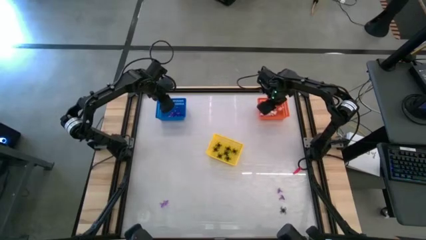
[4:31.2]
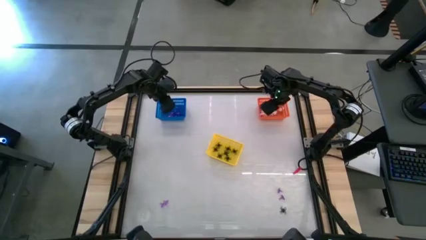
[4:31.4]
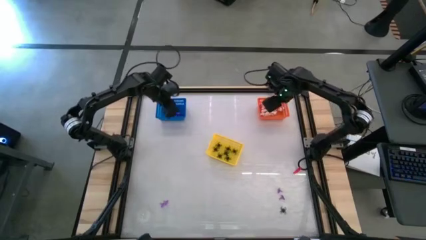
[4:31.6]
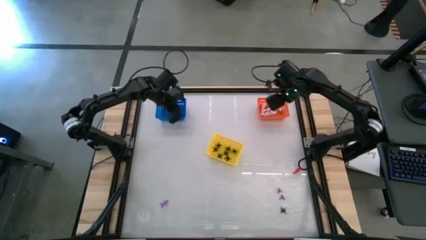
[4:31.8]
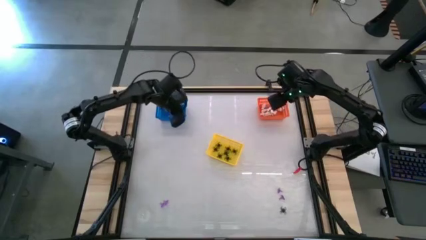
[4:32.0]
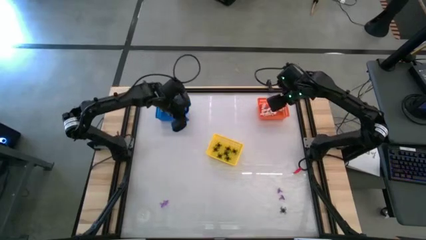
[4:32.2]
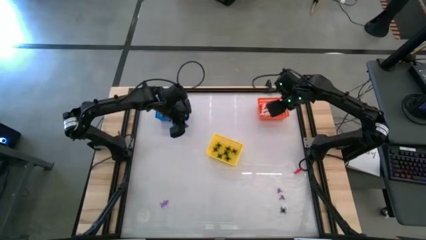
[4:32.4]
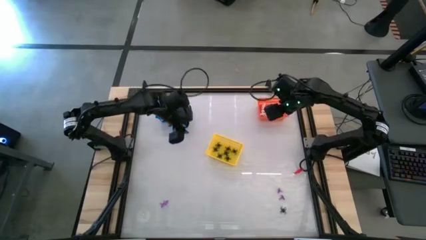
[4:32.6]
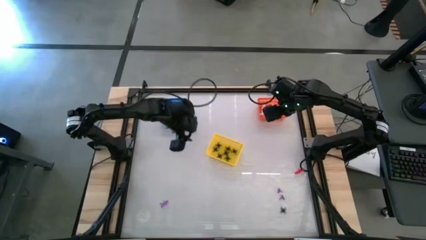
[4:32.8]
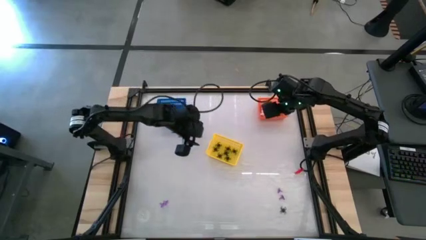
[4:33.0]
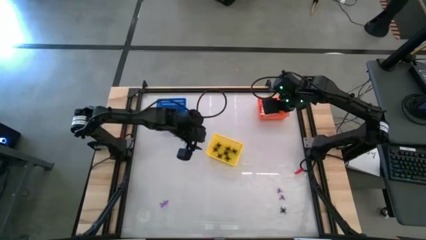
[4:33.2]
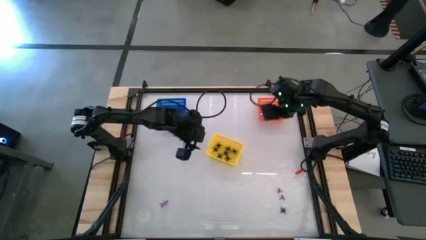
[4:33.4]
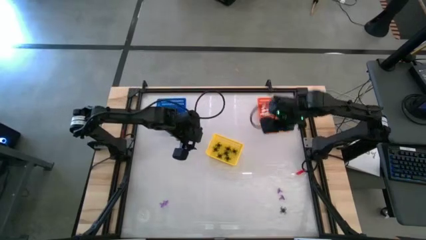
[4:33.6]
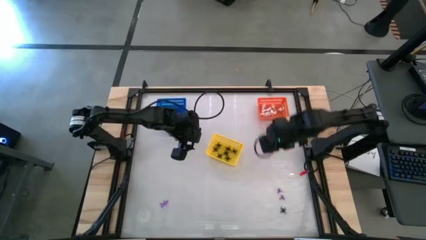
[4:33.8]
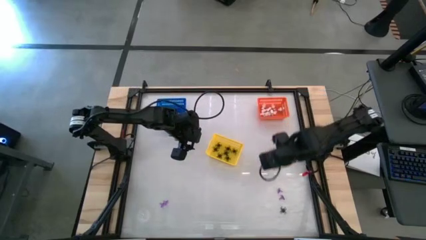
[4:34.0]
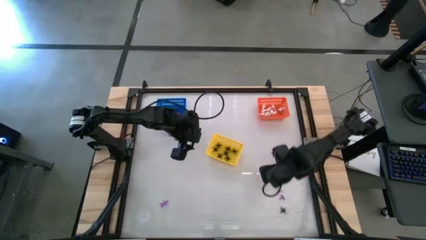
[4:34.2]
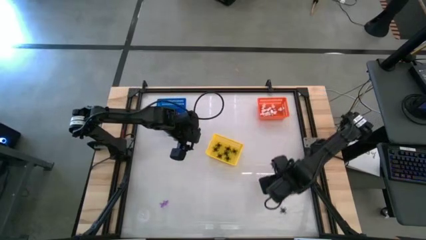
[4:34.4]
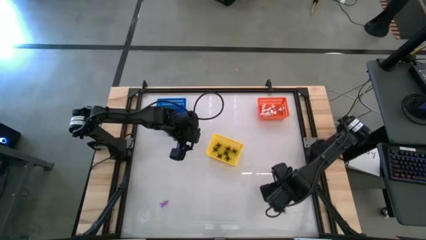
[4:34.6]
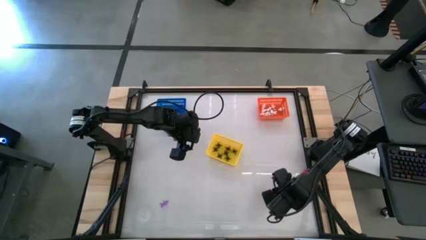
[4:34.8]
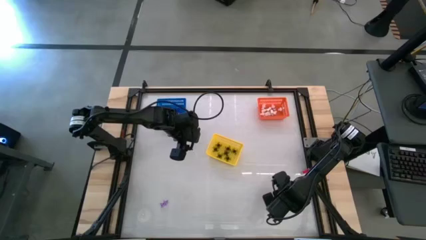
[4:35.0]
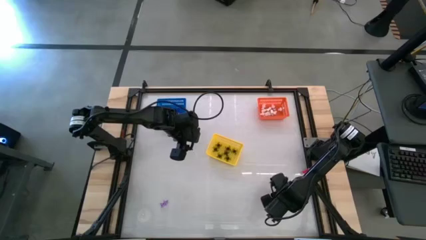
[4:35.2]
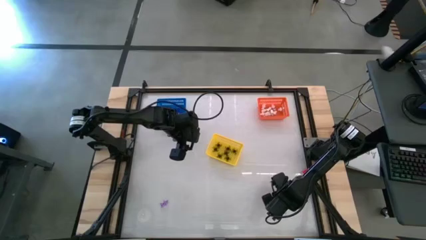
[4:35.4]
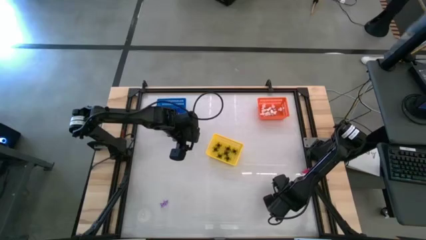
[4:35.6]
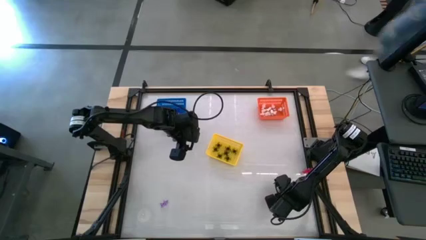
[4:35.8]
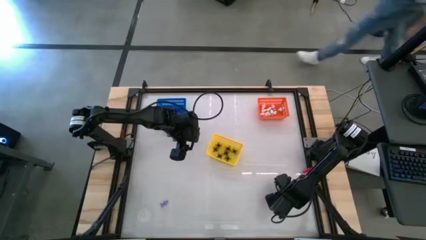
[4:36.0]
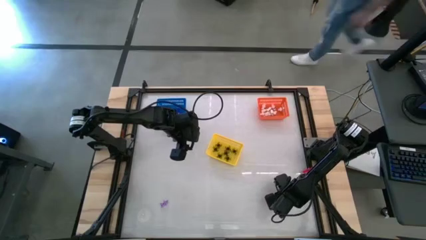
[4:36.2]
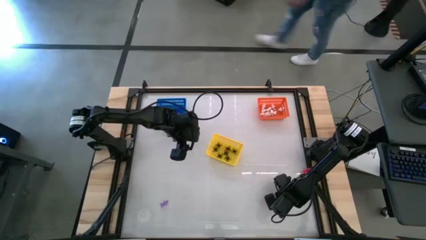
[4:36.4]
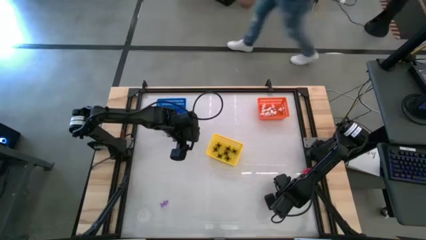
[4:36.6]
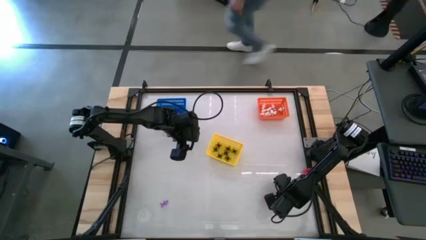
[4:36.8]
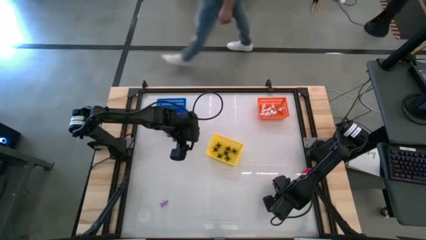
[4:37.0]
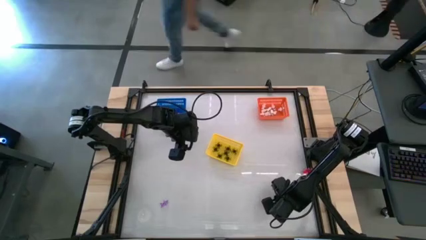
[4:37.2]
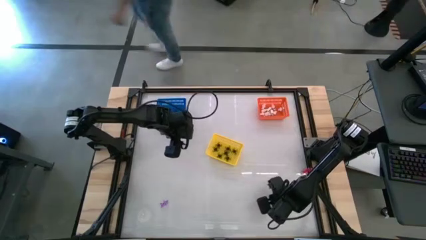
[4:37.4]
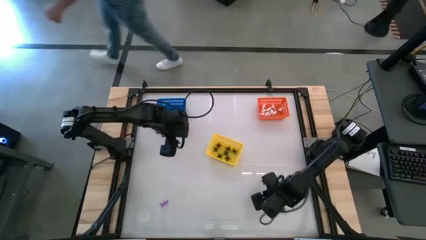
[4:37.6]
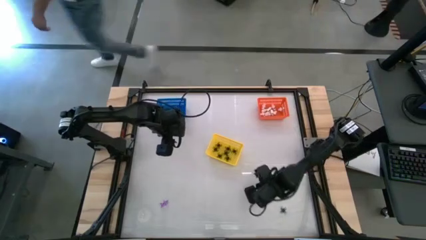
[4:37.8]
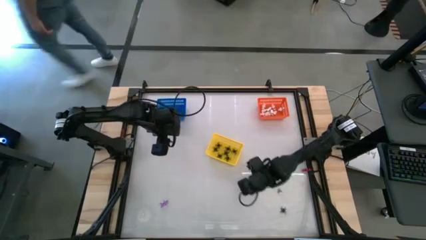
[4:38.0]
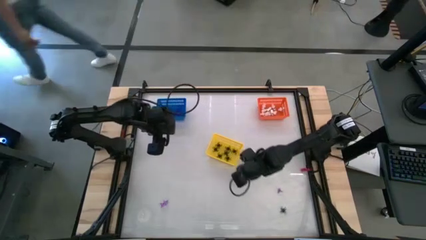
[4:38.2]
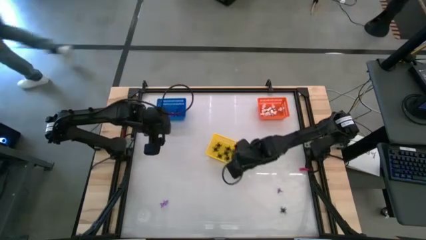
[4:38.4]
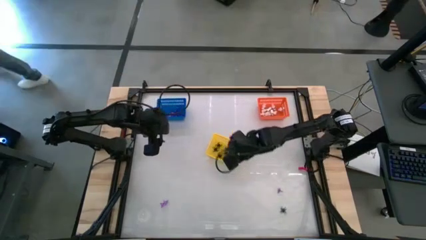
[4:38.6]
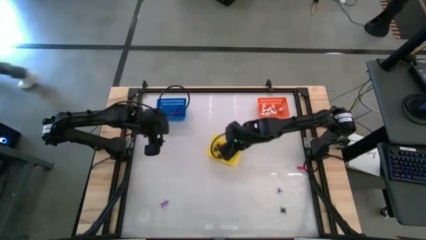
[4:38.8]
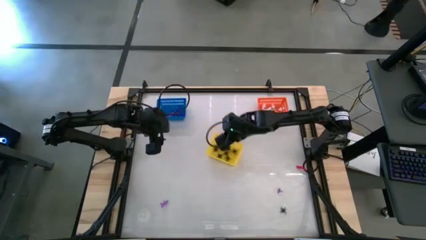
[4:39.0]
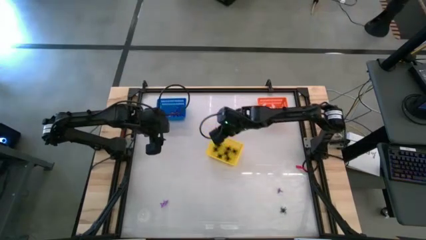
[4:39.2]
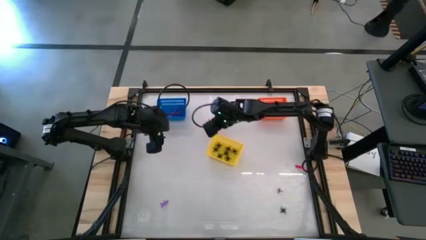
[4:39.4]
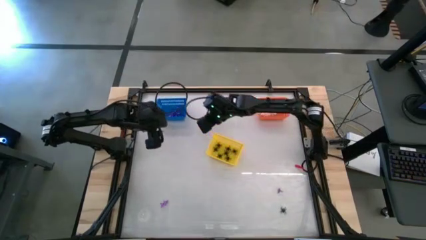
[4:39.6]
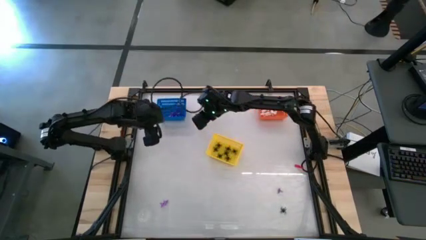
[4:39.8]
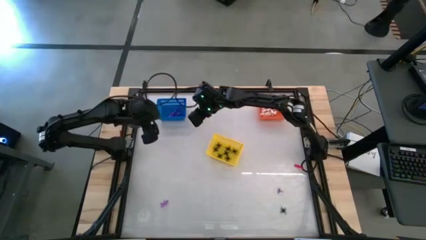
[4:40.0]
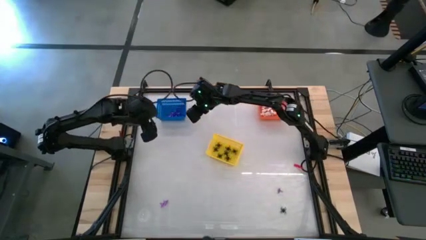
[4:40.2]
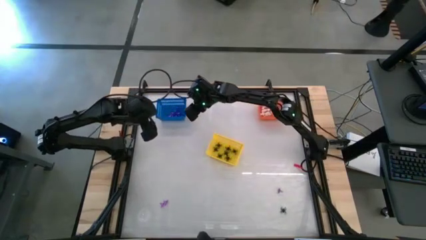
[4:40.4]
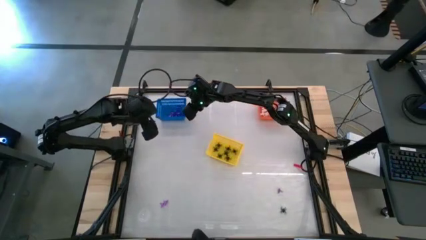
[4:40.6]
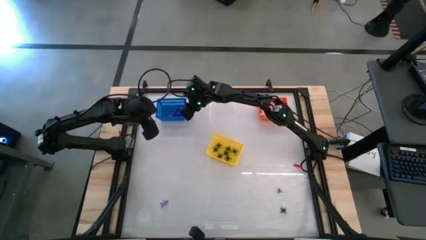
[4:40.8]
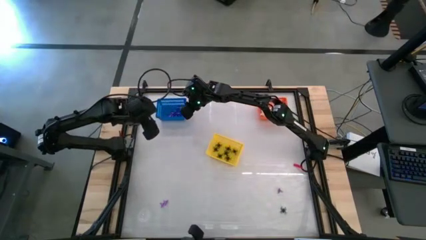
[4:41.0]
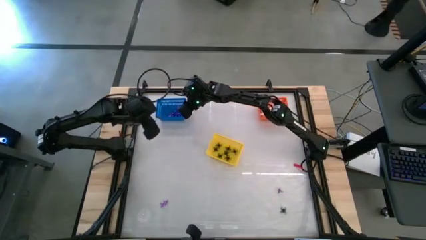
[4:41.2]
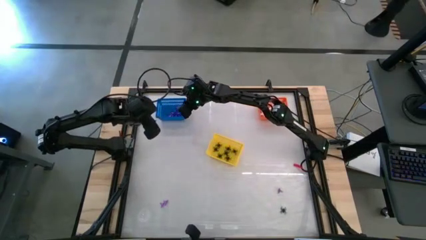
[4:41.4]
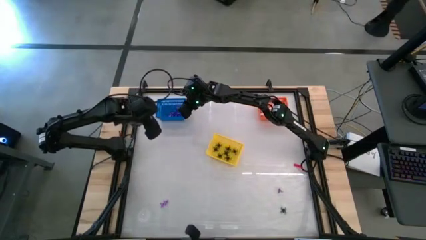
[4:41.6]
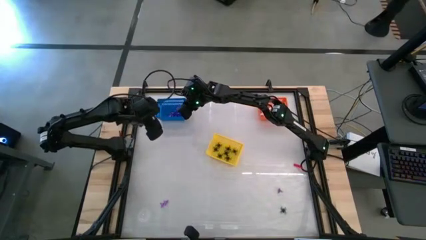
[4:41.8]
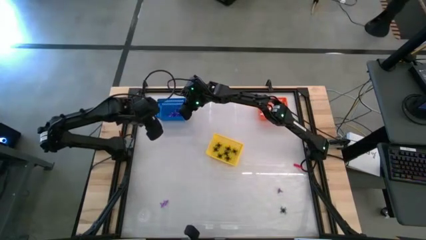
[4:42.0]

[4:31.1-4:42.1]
Task: Sort Halloween decoration
Put the purple witch hat toy into the blue bin

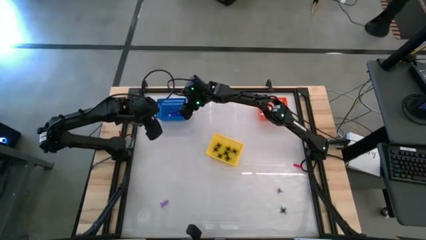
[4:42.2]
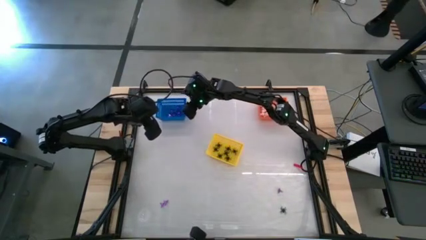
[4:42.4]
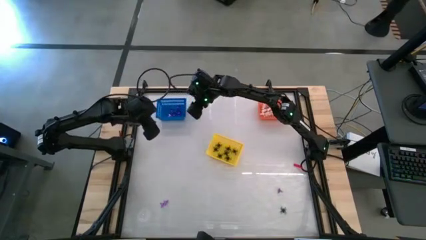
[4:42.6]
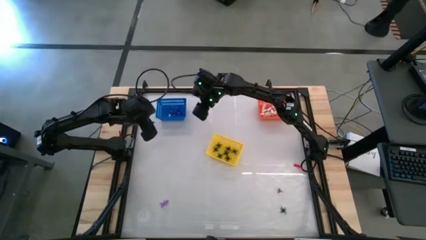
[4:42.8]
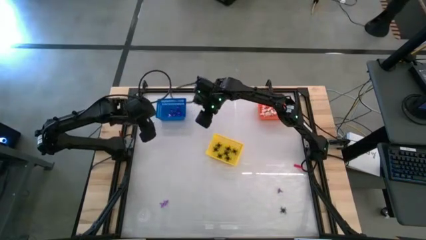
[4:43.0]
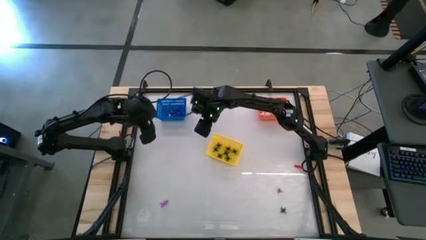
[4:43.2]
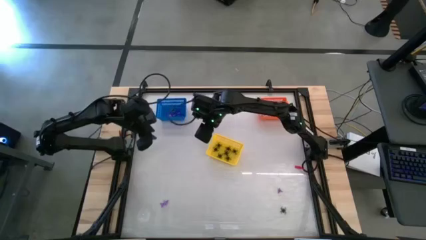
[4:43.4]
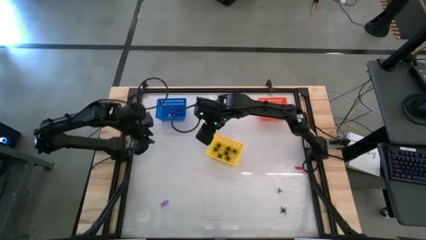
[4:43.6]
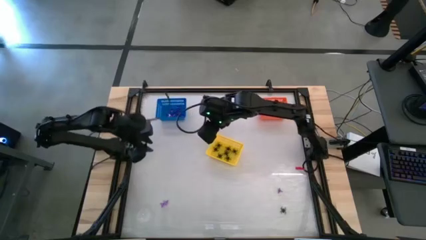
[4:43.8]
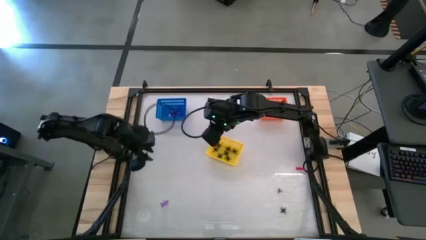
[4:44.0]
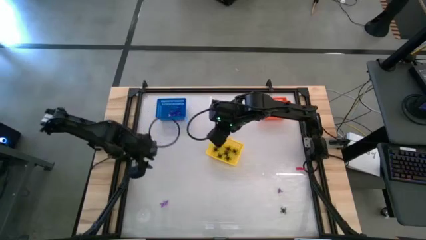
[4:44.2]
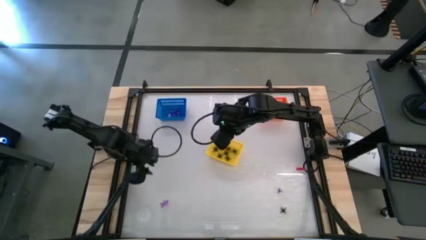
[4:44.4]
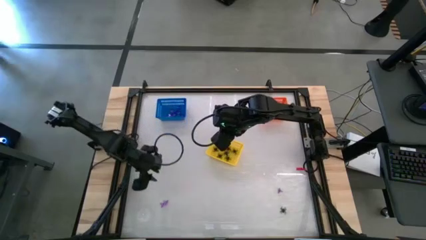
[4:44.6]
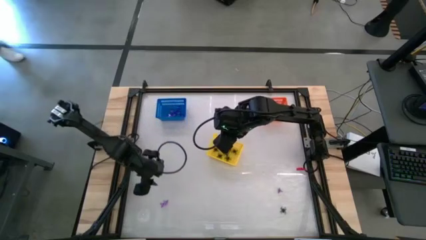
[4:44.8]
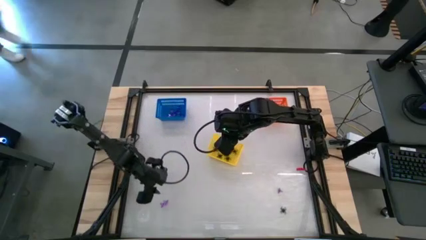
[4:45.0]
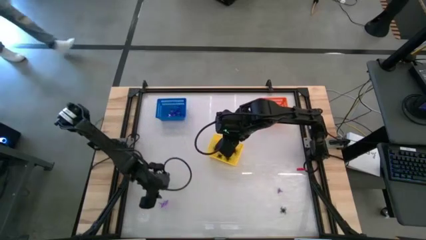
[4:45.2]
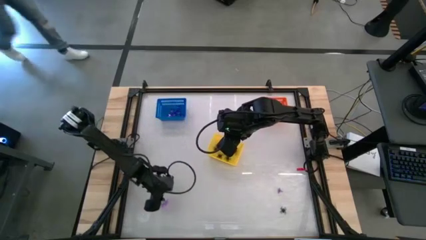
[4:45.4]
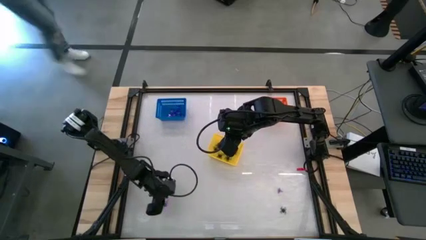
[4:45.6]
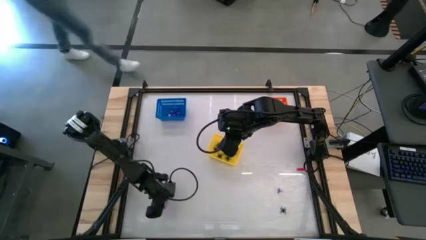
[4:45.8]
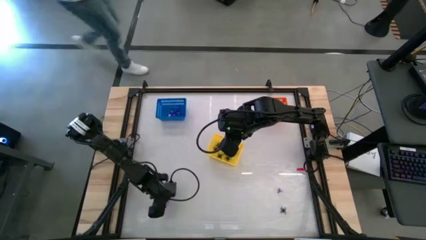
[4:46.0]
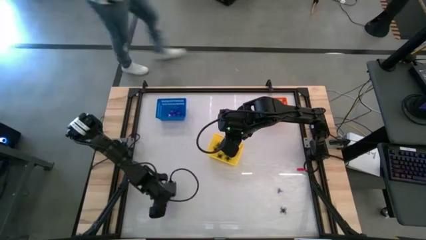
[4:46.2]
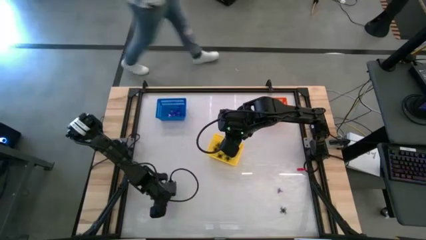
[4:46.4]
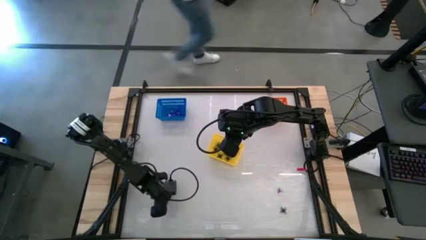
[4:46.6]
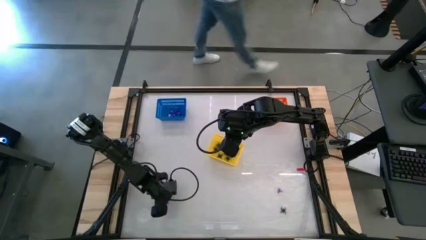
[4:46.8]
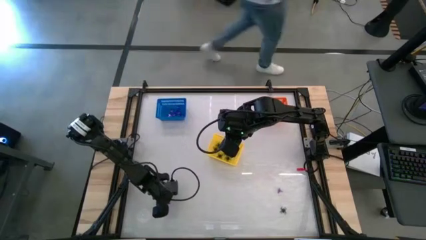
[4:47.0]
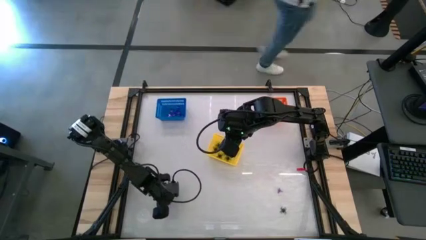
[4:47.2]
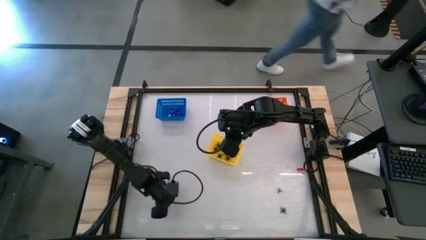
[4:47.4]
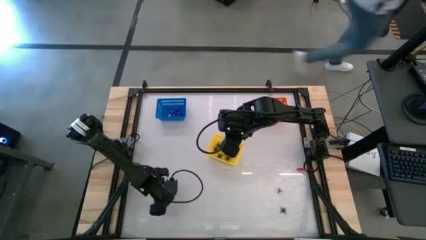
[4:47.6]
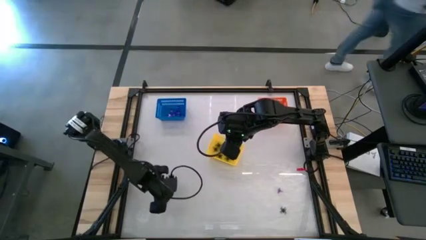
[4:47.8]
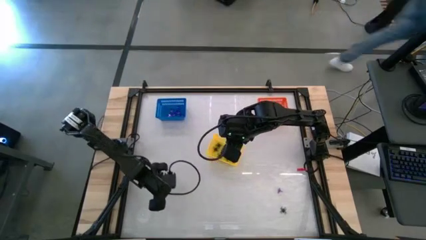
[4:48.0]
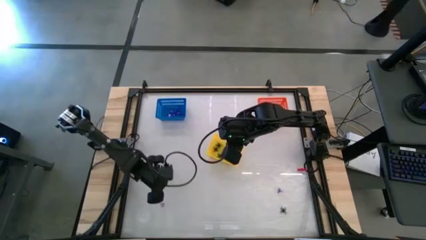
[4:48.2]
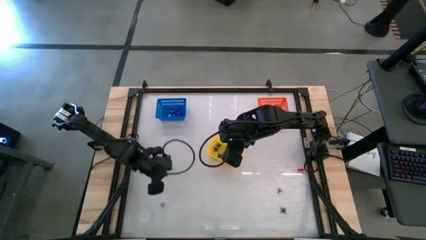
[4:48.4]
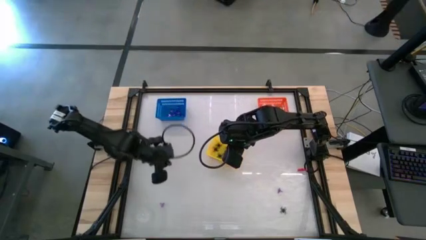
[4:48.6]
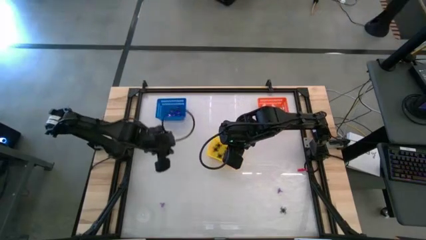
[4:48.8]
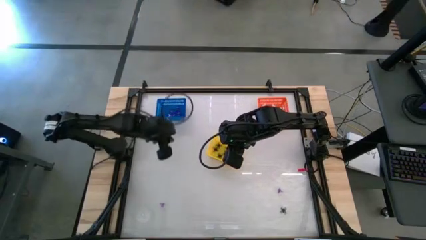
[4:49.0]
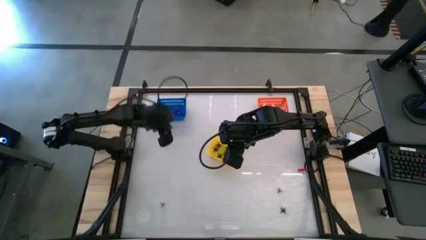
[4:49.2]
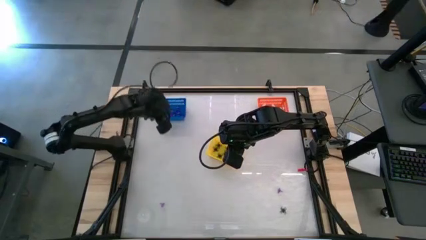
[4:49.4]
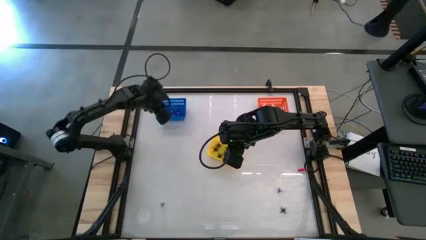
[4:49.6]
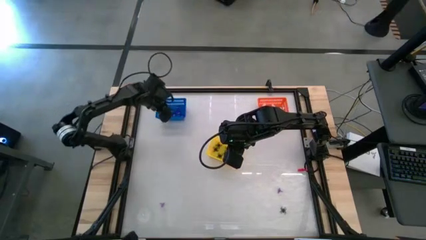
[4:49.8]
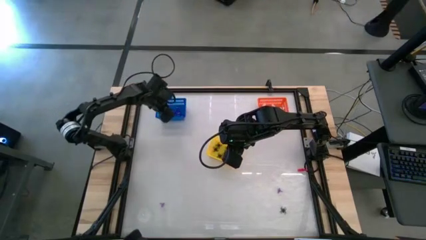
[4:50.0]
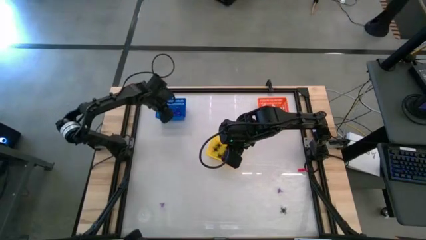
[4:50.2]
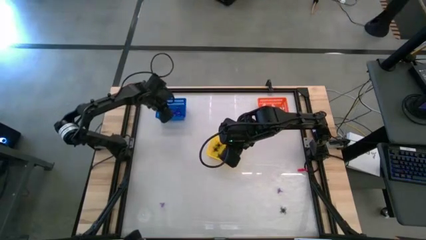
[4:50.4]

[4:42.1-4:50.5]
Put the purple witch hat toy into the blue bin
